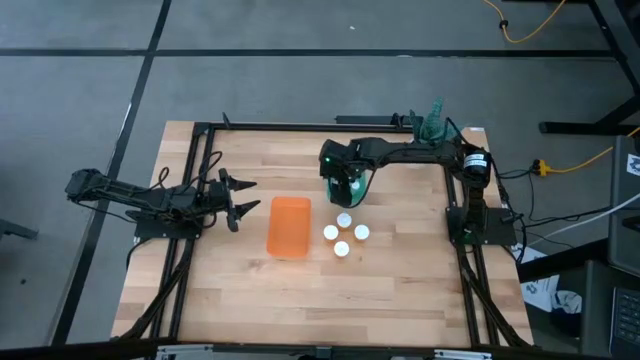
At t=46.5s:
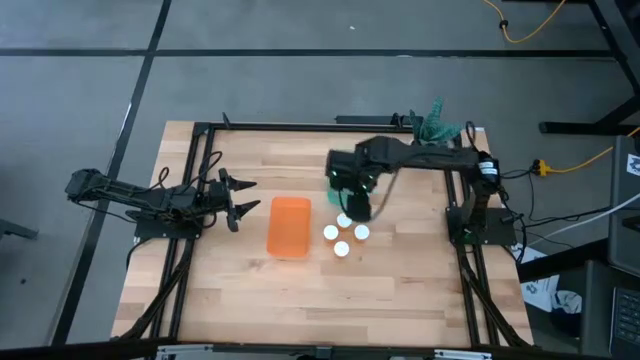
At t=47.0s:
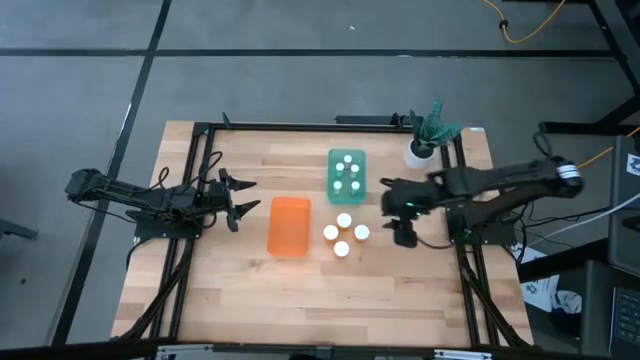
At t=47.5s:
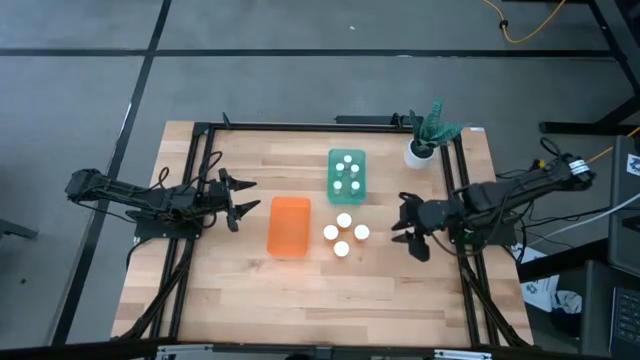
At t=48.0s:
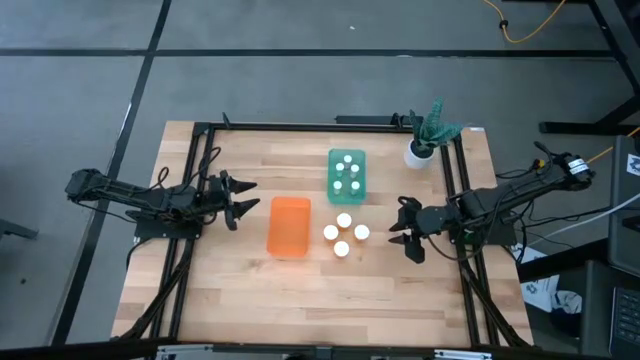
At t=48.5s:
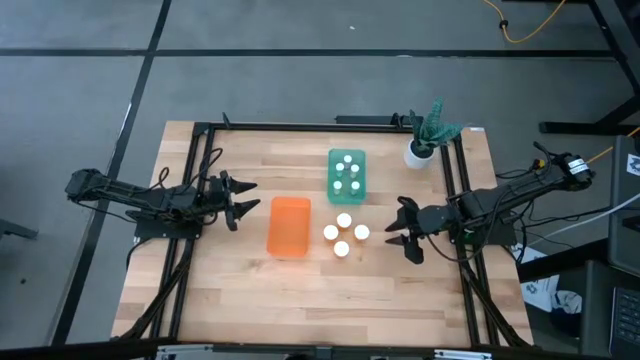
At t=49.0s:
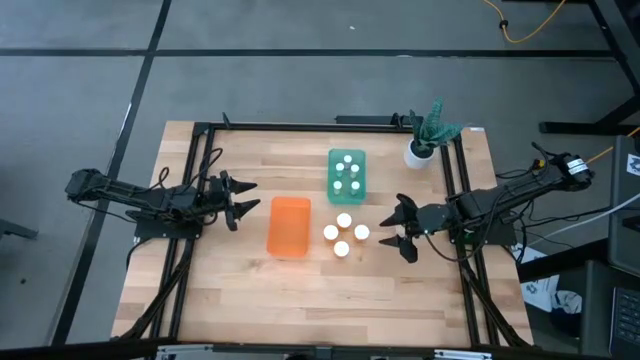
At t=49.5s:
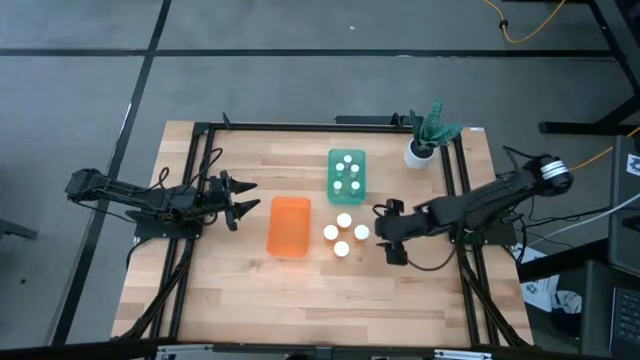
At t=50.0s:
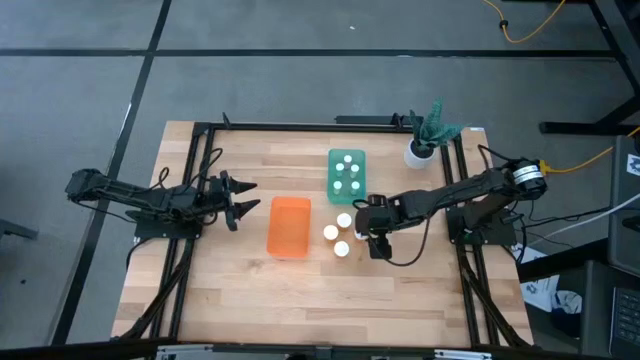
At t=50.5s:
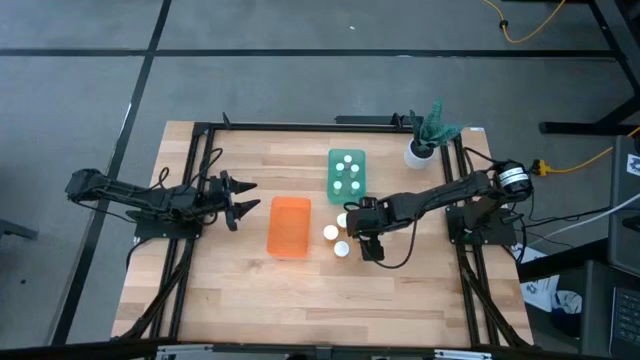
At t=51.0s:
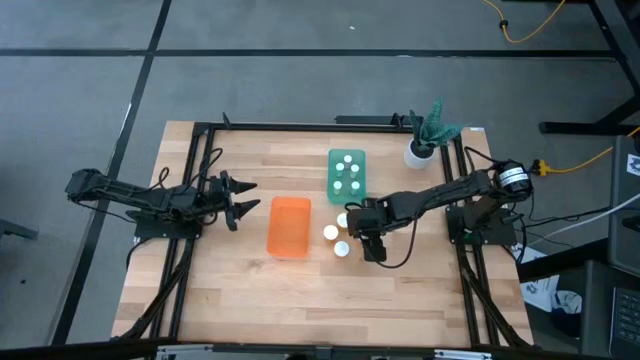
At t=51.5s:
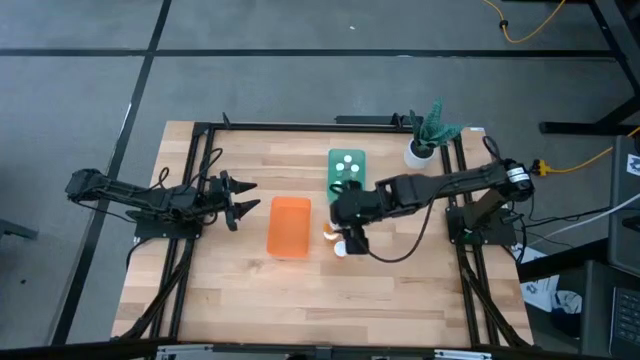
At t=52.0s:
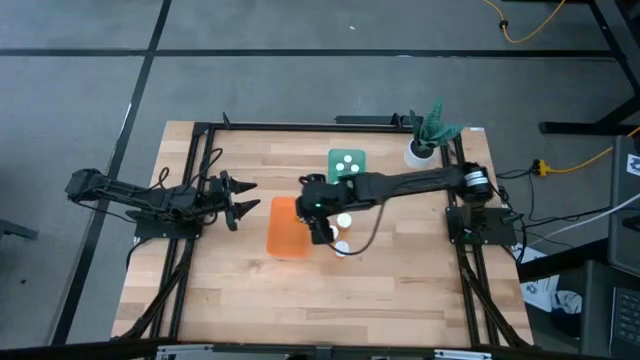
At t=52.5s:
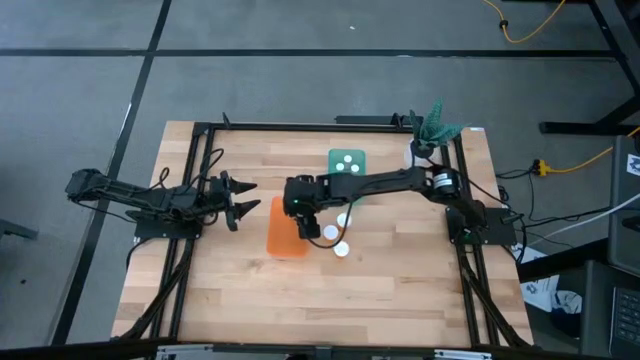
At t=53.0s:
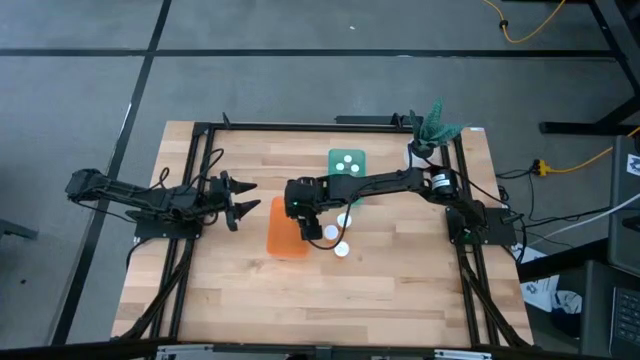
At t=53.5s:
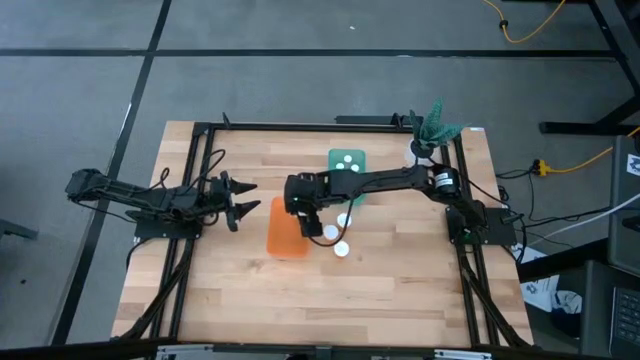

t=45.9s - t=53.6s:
Task: Pick and place medicine bottles into bin by pill shape (circle, oval)
Put the large orange medicine bottle into the orange bin

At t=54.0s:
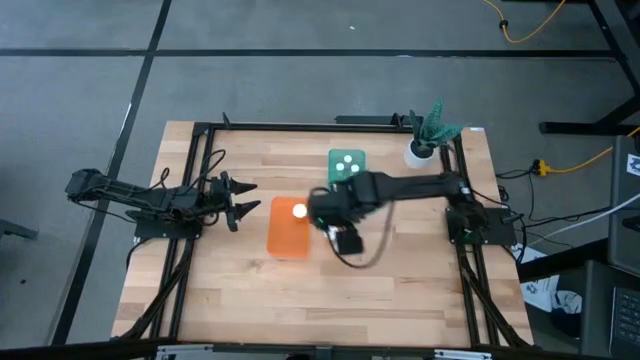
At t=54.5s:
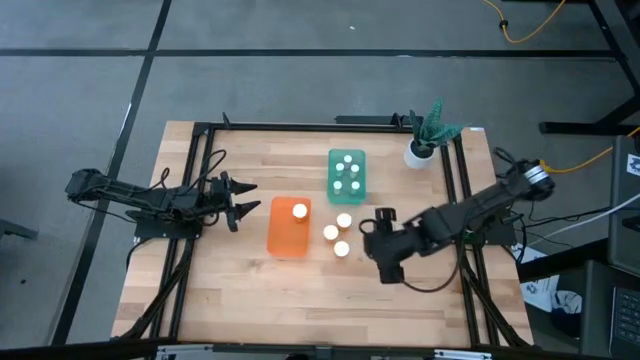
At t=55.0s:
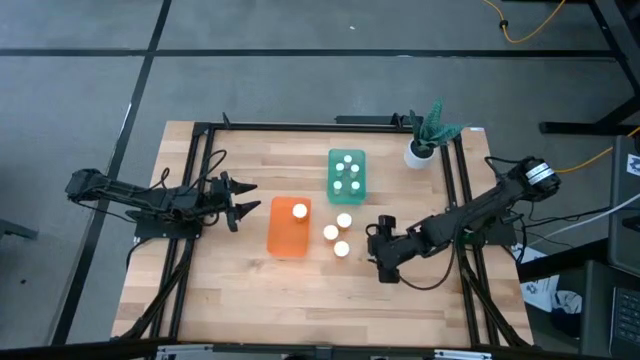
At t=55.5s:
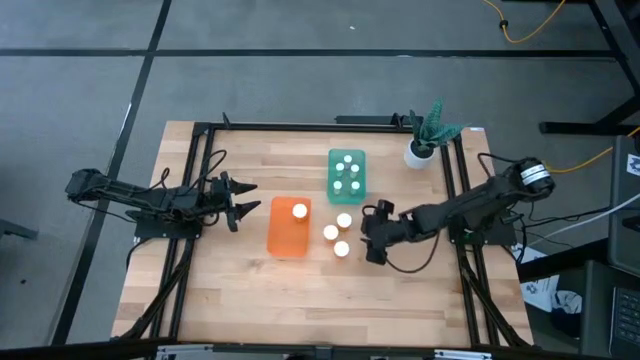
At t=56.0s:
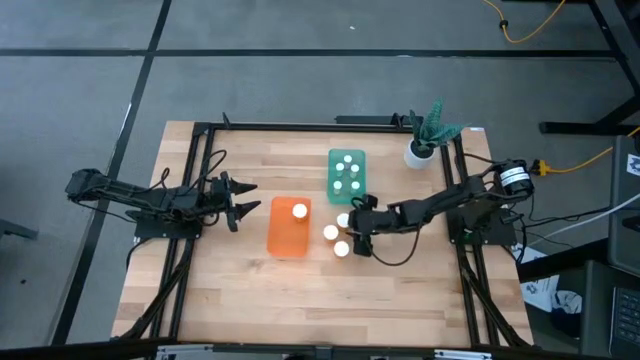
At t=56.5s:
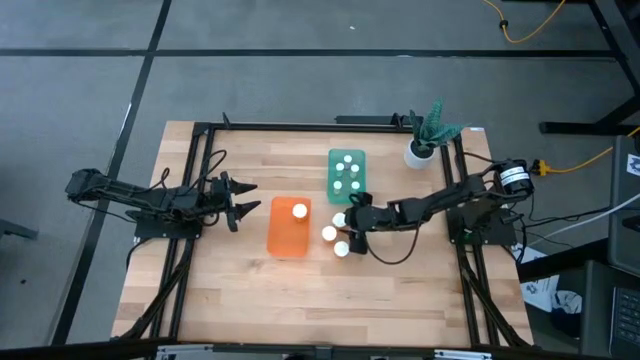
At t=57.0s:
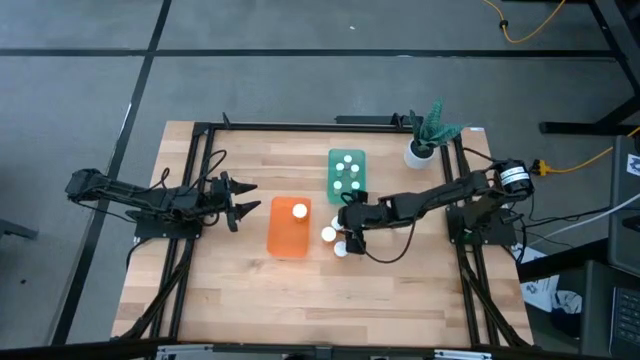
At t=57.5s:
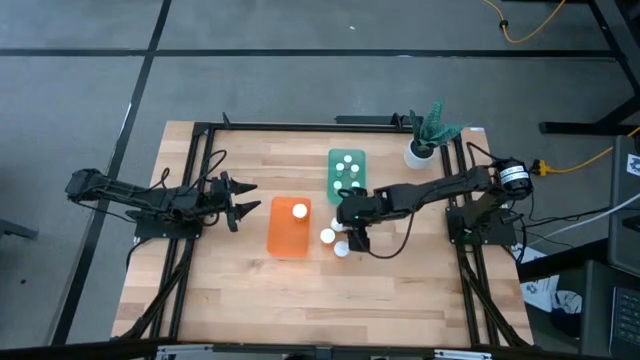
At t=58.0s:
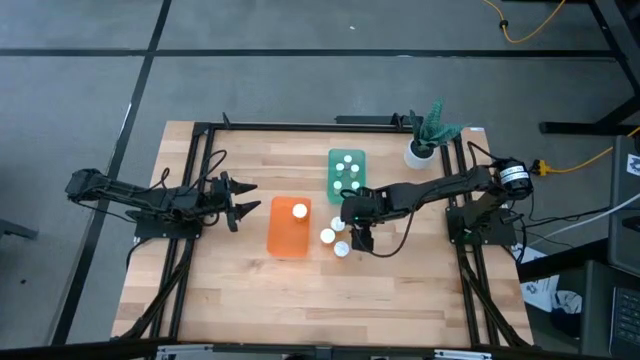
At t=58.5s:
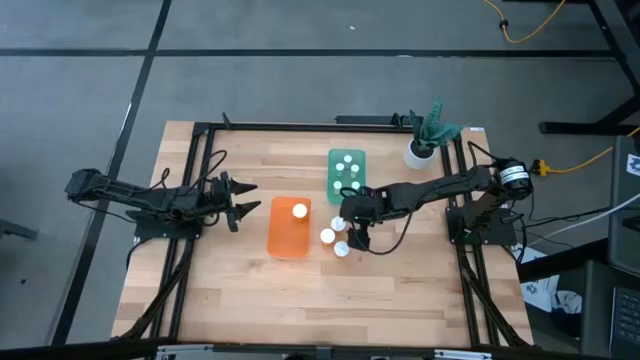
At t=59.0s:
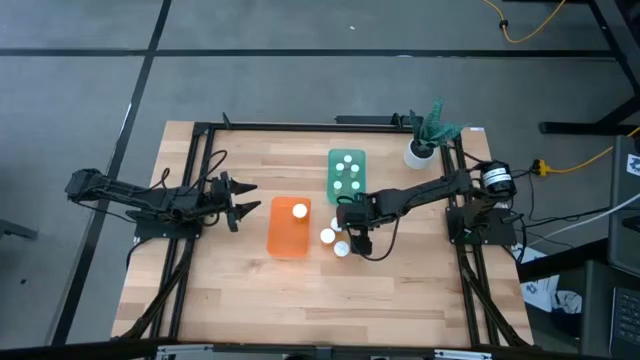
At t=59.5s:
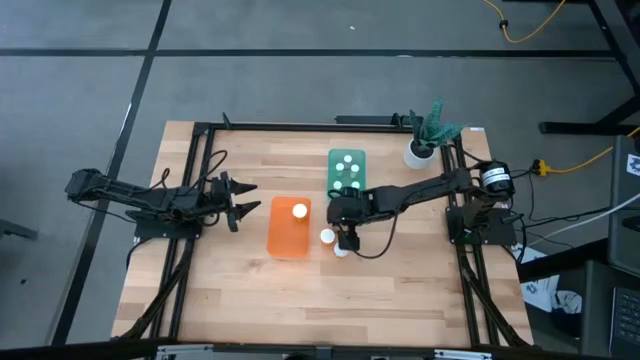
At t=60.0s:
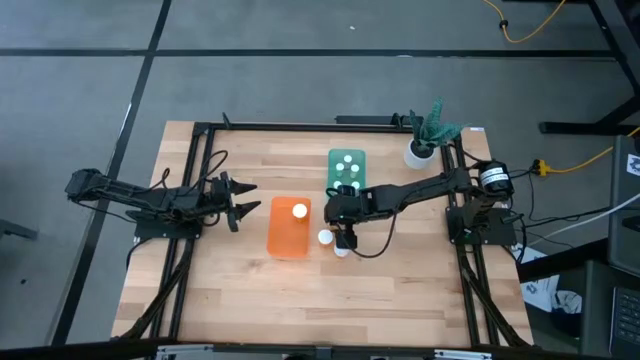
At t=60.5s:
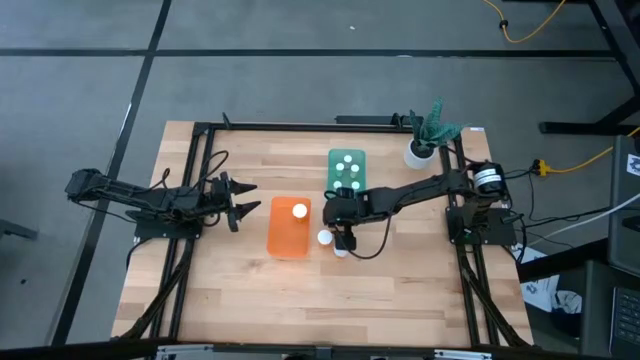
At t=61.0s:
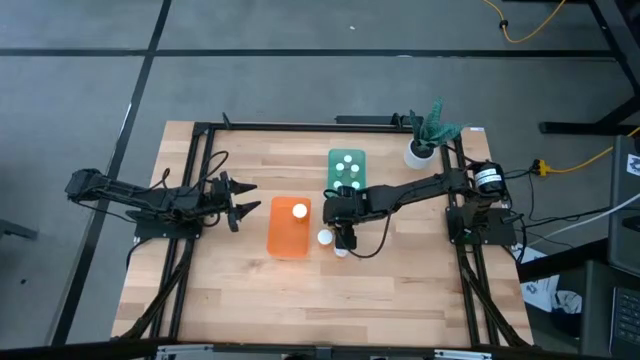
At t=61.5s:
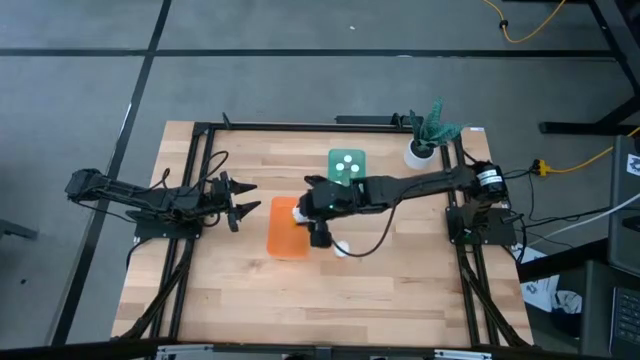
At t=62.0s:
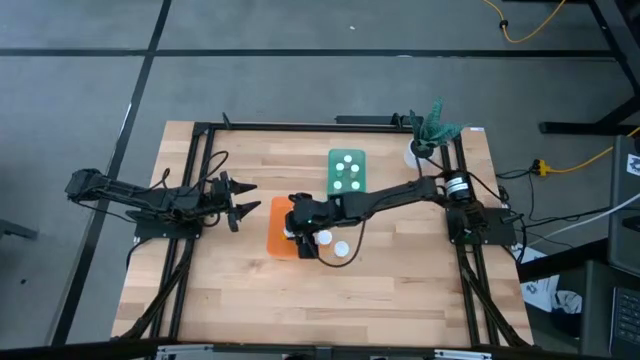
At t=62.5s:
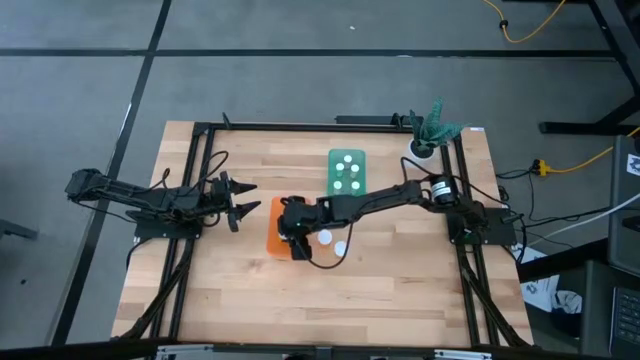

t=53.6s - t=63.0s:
Put the large orange medicine bottle into the orange bin

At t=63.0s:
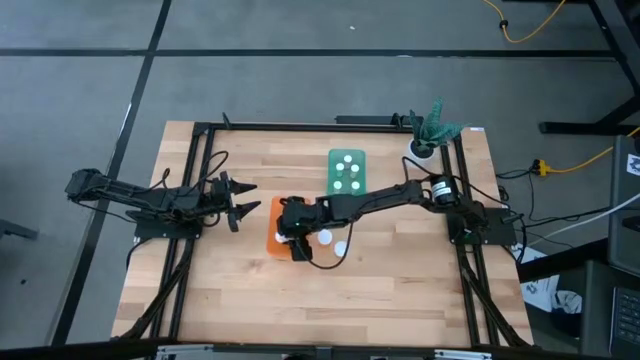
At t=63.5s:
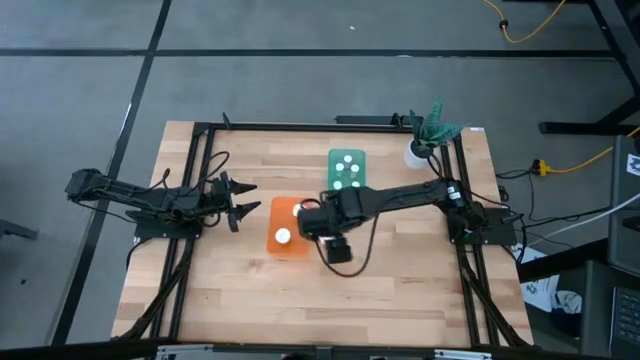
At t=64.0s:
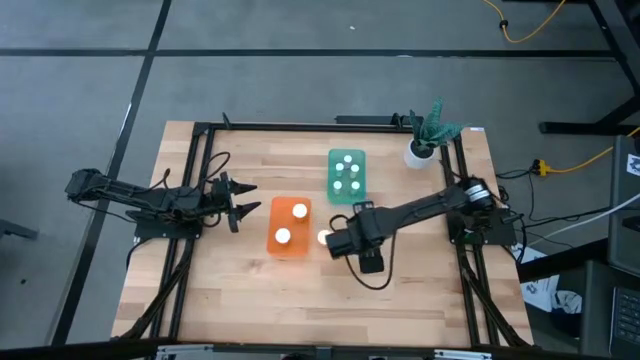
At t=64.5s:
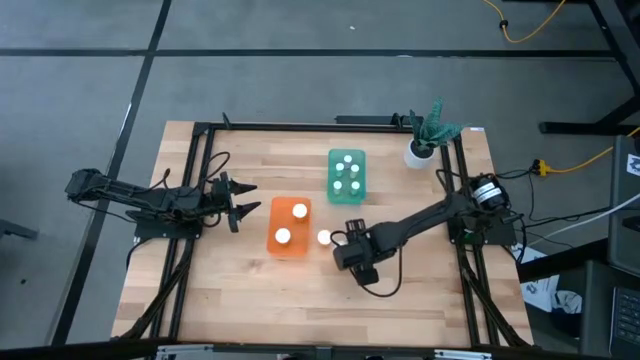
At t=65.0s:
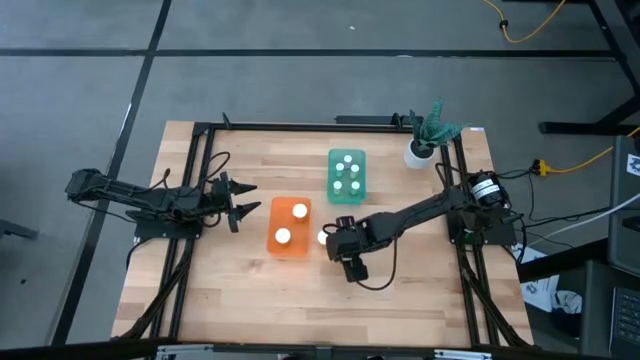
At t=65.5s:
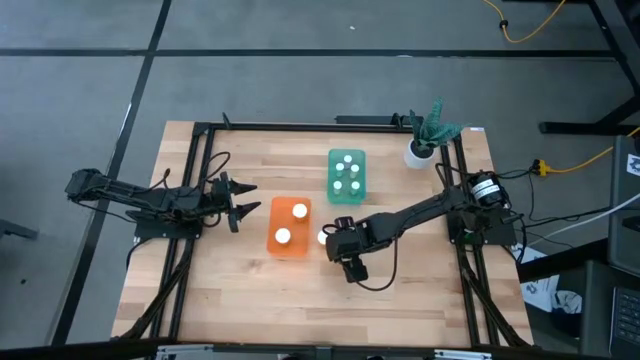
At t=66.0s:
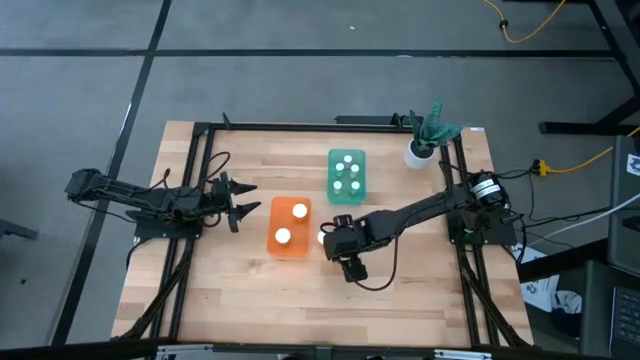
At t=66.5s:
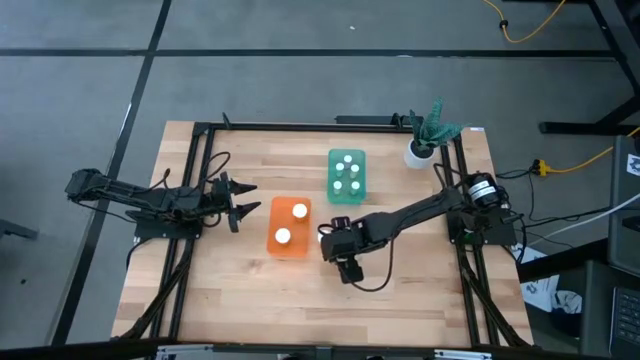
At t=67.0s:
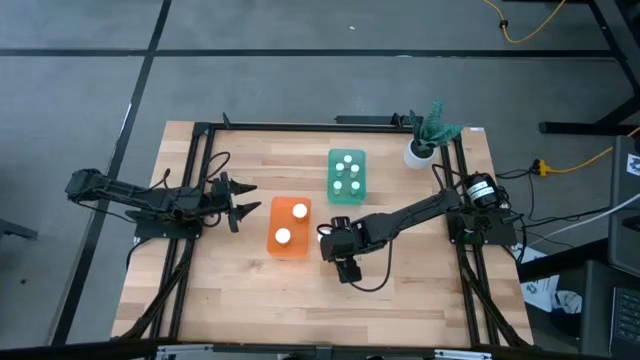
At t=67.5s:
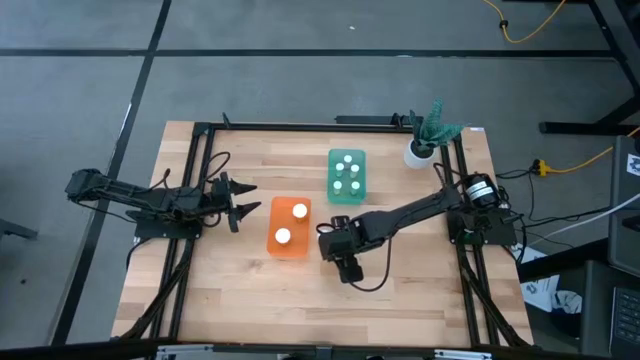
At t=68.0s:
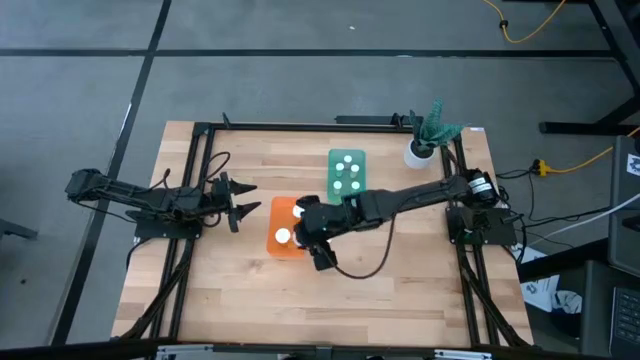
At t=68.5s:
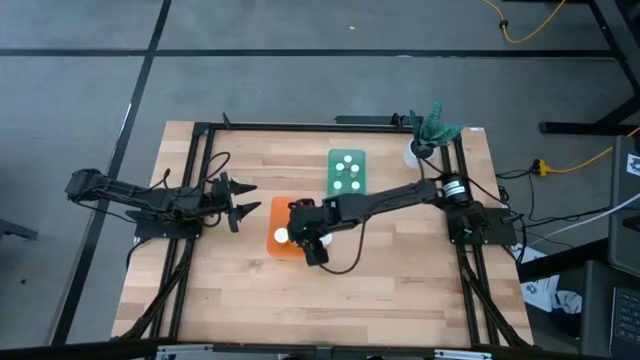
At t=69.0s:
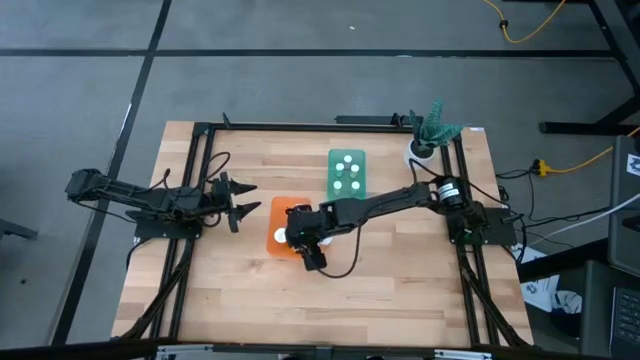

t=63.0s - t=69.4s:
Put the large orange medicine bottle into the orange bin
